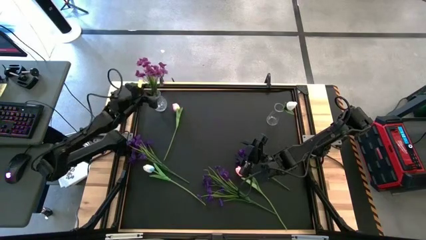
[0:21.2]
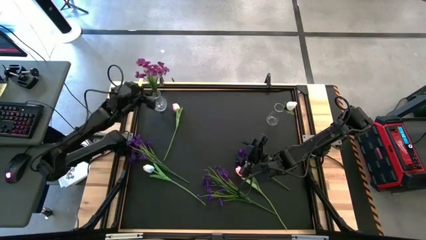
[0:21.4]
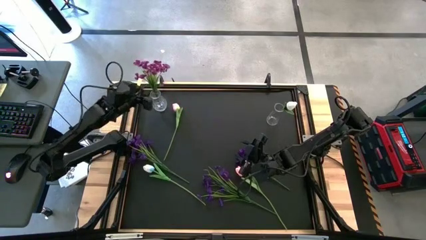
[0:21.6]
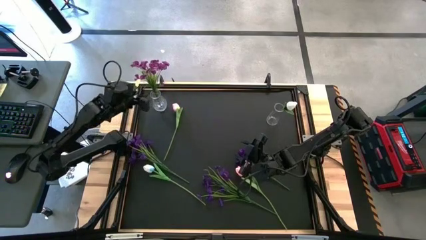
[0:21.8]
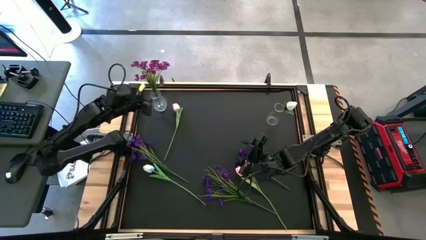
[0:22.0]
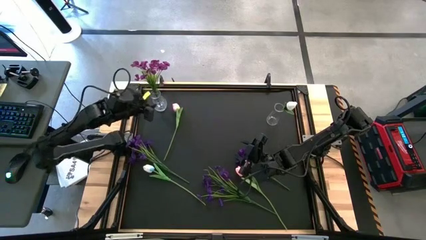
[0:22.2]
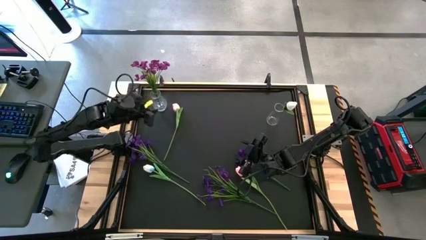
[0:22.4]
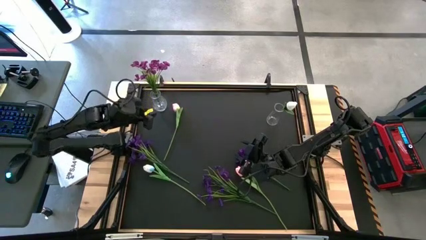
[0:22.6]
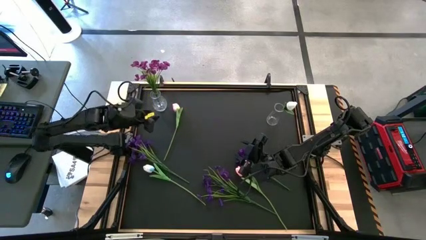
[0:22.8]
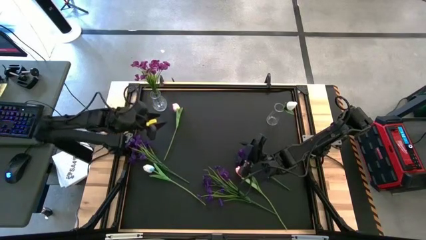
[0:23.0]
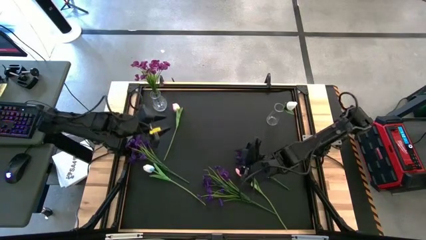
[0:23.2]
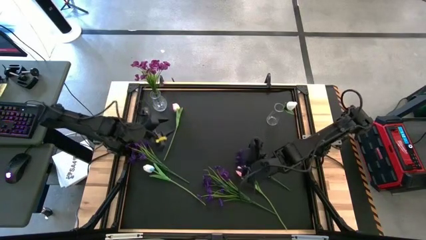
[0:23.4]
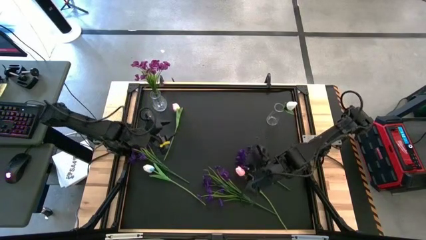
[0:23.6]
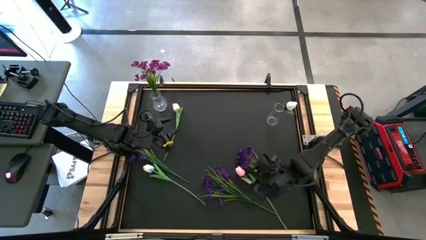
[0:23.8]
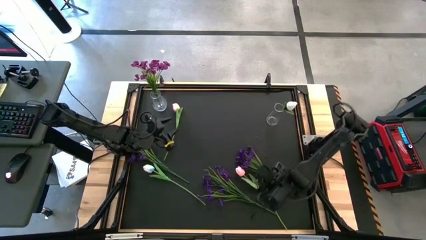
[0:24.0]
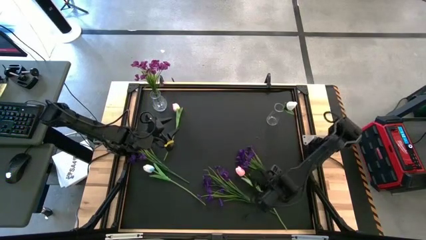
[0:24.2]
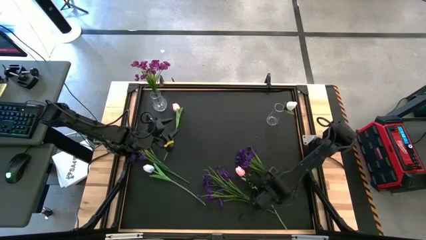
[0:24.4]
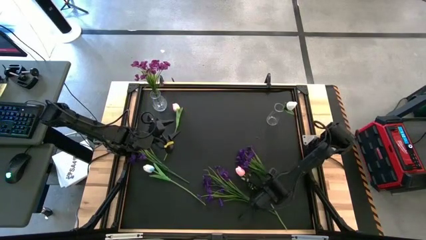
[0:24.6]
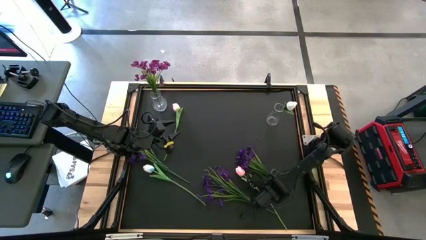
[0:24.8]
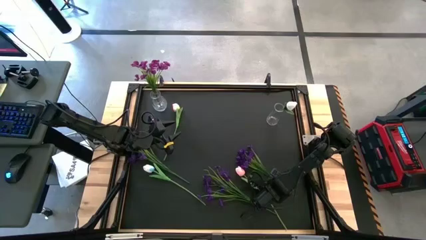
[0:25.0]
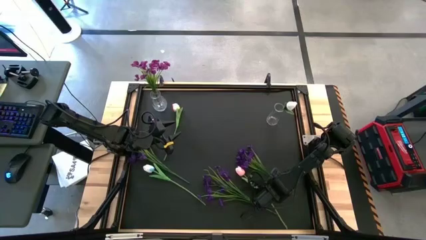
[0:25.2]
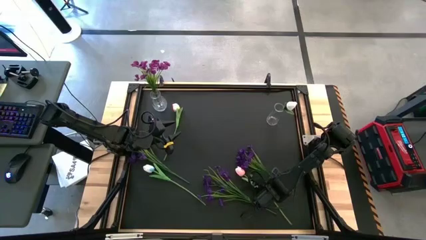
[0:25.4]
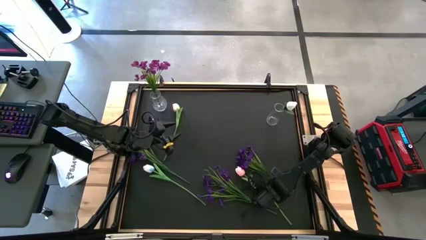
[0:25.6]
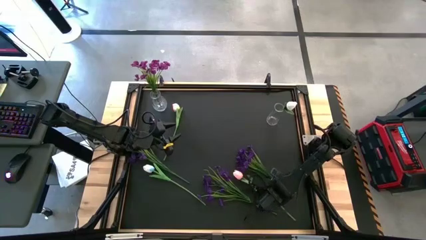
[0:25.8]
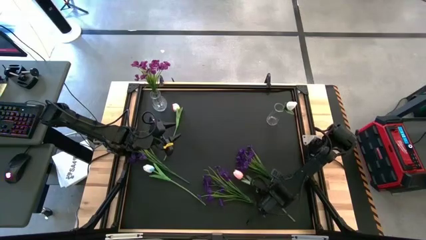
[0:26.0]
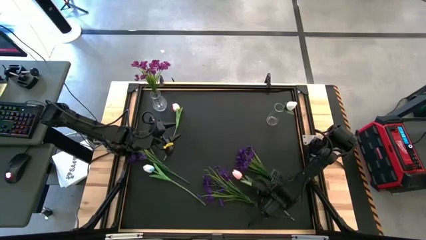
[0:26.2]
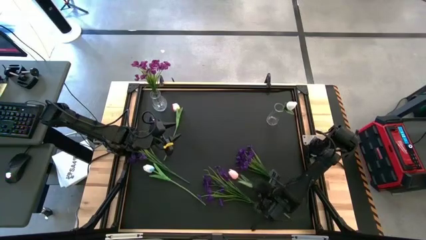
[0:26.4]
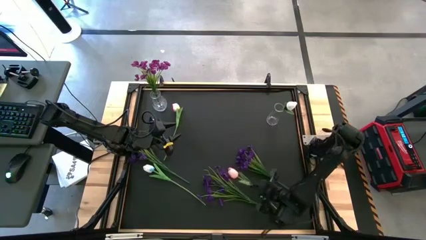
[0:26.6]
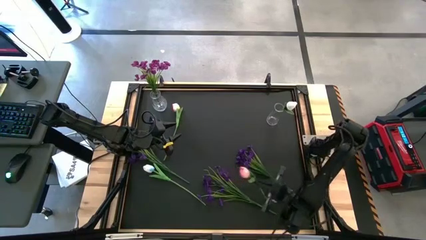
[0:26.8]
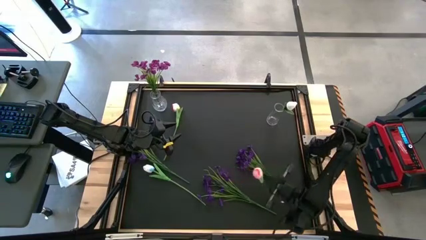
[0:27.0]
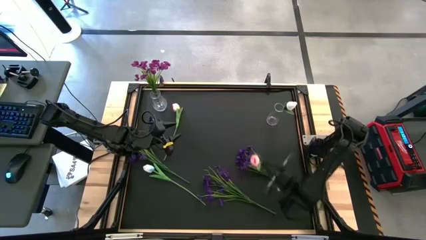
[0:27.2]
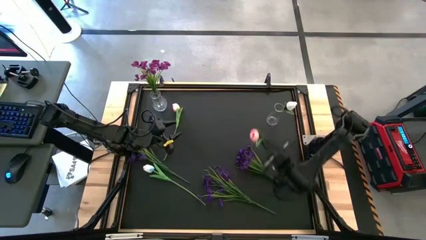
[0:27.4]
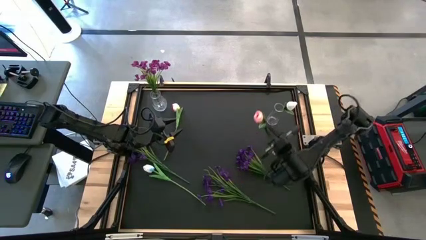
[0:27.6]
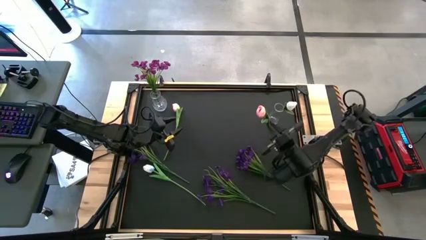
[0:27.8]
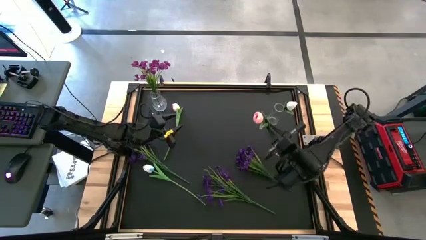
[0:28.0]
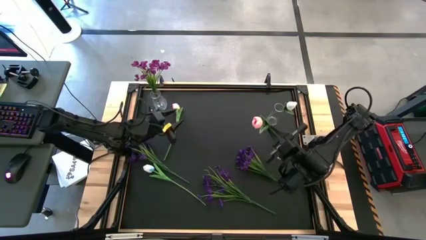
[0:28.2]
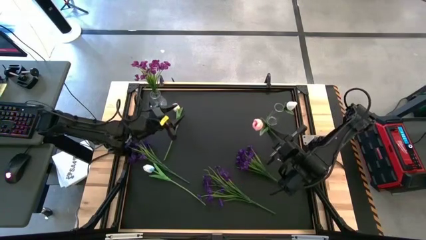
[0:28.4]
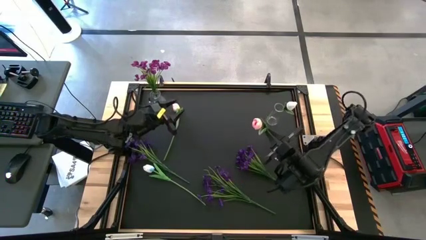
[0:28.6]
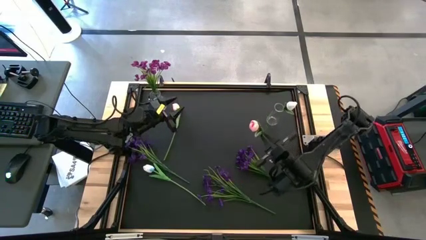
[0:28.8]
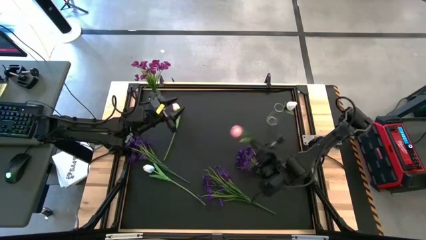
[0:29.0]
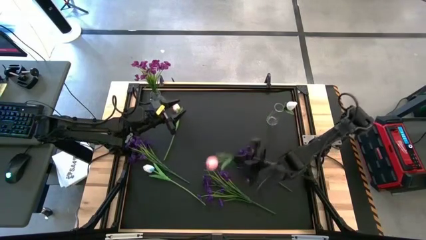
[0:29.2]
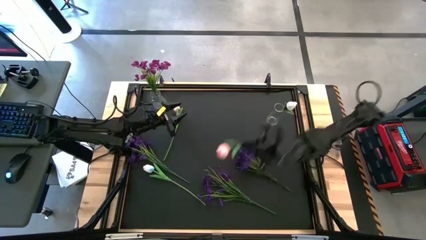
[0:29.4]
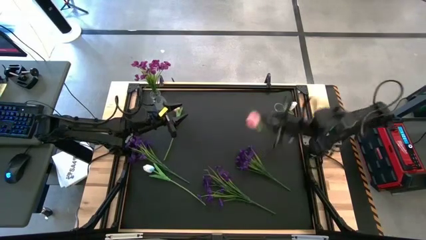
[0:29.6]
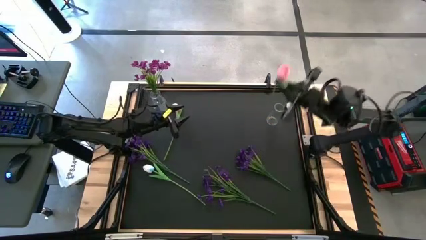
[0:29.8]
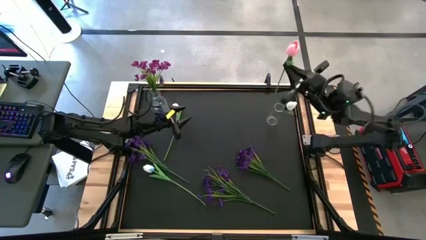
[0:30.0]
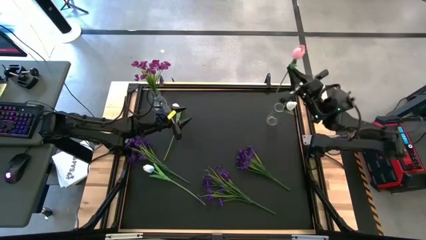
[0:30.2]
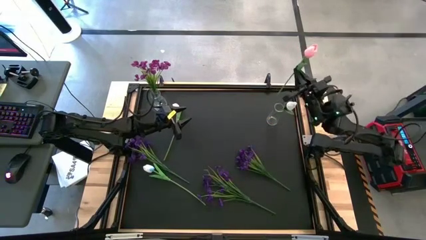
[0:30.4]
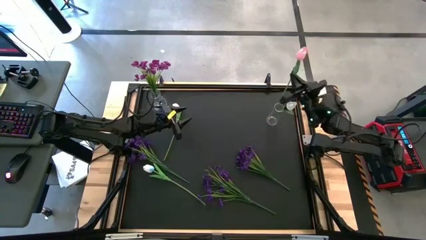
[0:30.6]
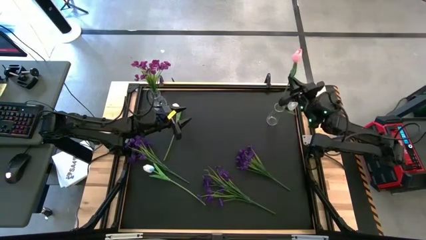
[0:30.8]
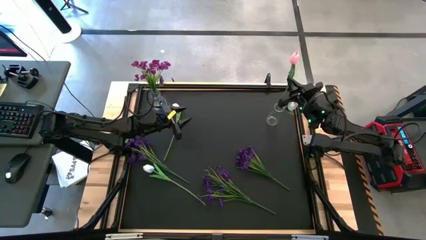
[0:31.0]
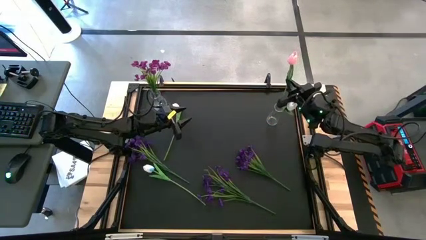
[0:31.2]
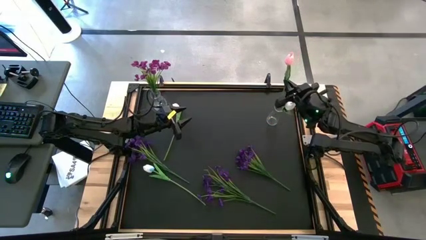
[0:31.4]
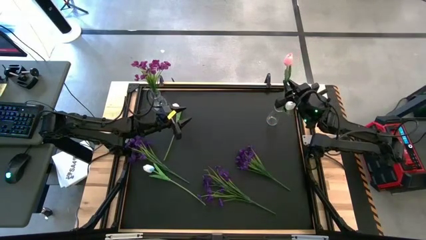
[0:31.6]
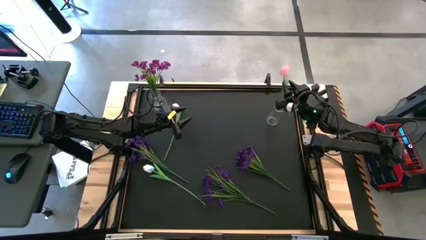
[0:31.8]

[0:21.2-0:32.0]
Task: Sort flowers into vase by color
Put the bottom right pink tulip into the right transparent vase
